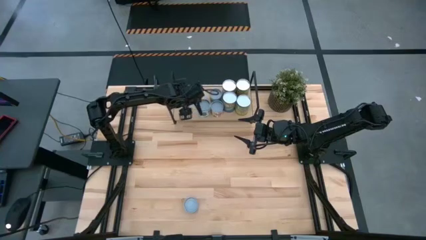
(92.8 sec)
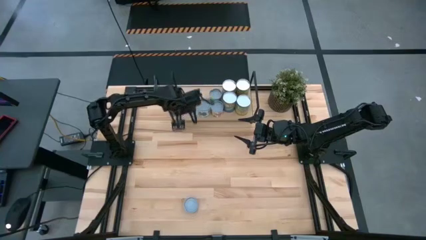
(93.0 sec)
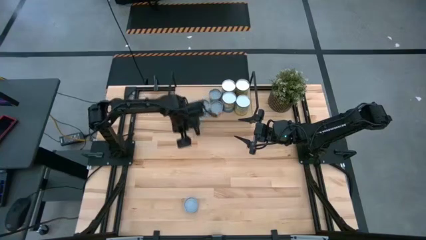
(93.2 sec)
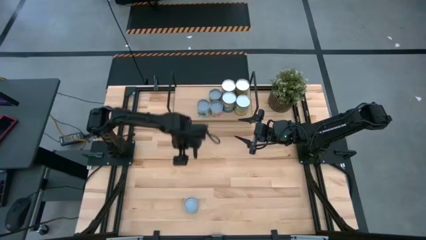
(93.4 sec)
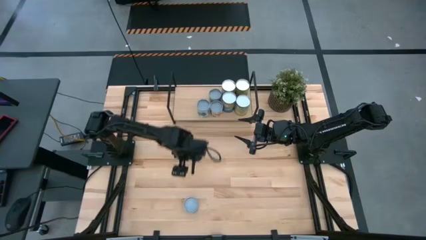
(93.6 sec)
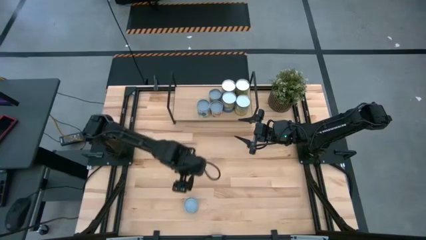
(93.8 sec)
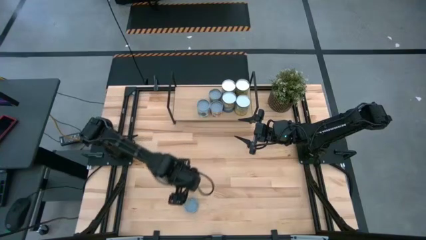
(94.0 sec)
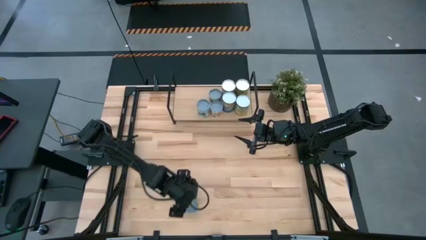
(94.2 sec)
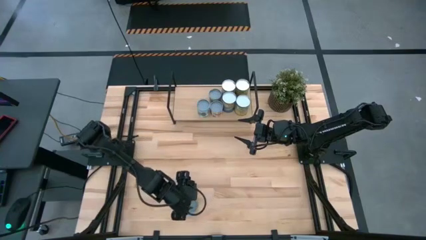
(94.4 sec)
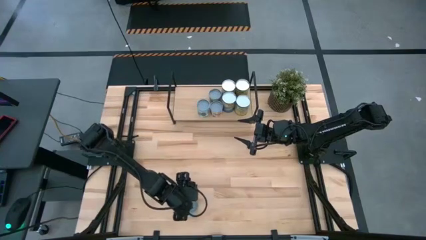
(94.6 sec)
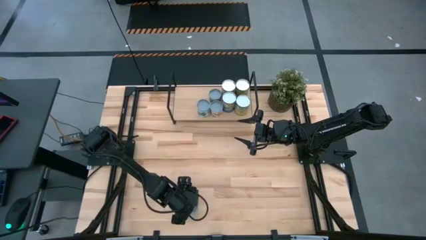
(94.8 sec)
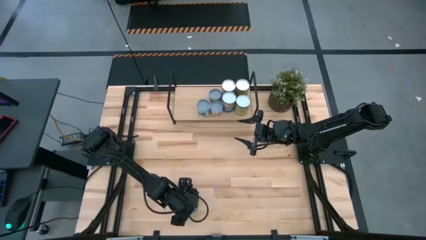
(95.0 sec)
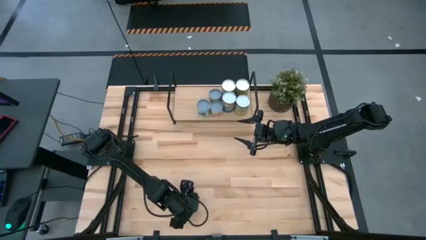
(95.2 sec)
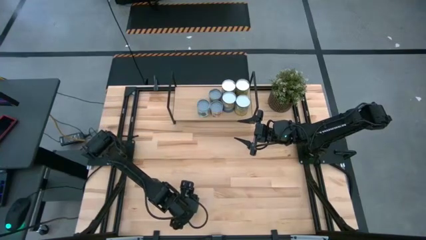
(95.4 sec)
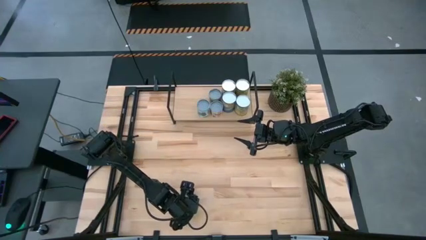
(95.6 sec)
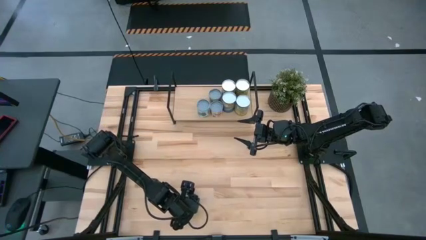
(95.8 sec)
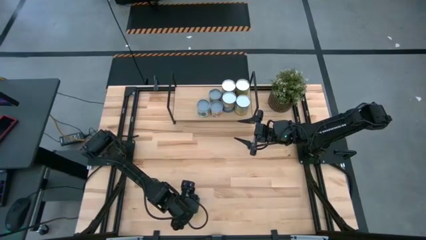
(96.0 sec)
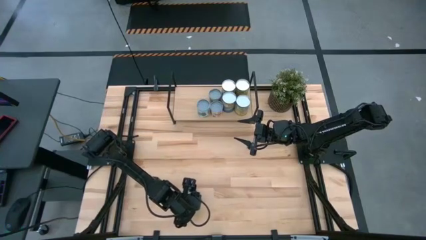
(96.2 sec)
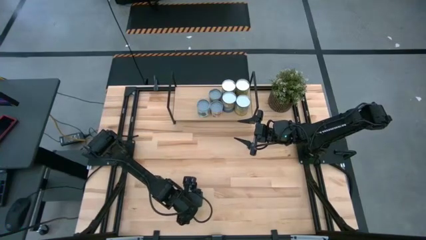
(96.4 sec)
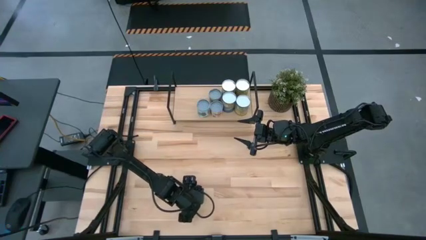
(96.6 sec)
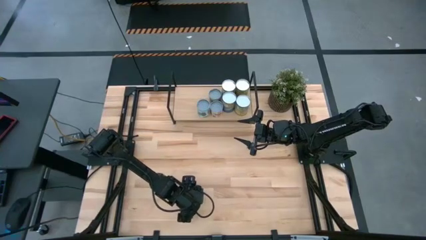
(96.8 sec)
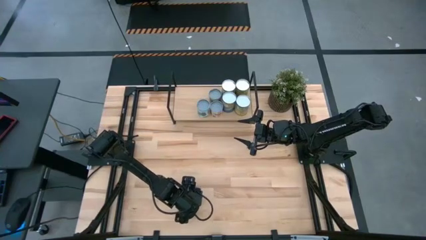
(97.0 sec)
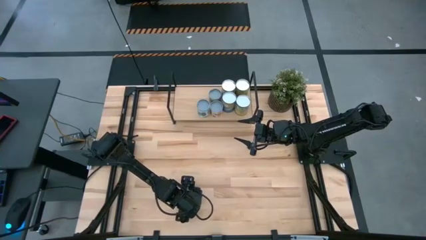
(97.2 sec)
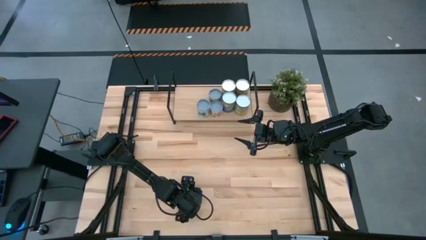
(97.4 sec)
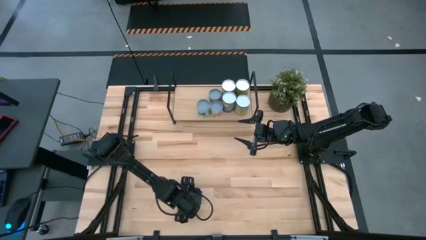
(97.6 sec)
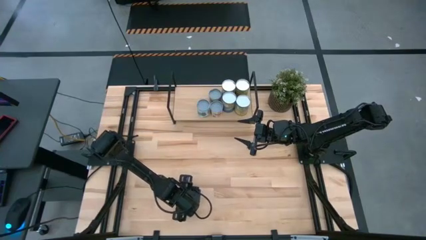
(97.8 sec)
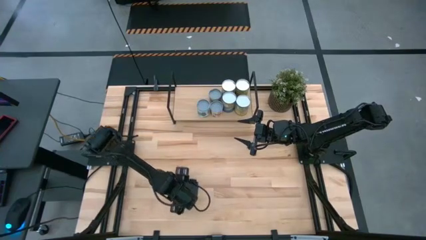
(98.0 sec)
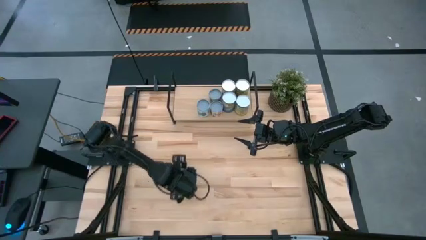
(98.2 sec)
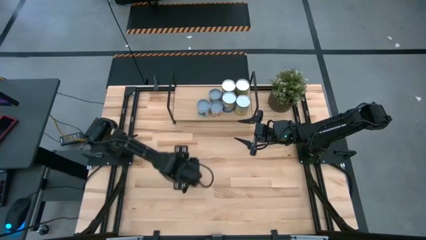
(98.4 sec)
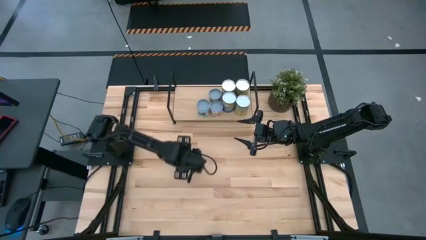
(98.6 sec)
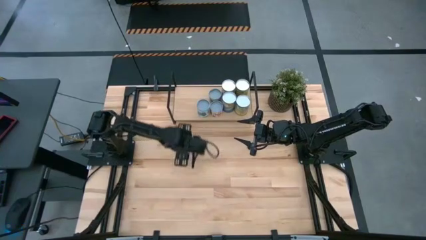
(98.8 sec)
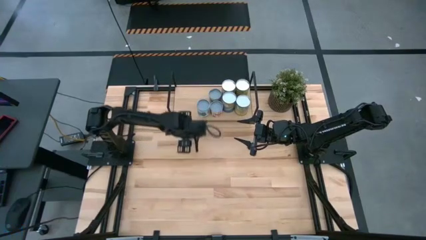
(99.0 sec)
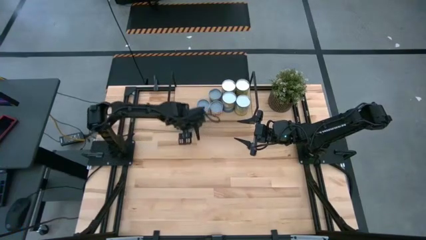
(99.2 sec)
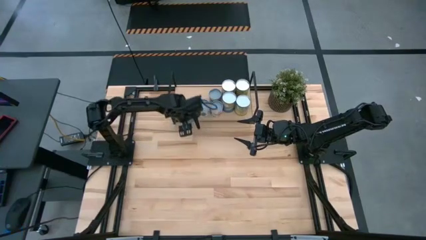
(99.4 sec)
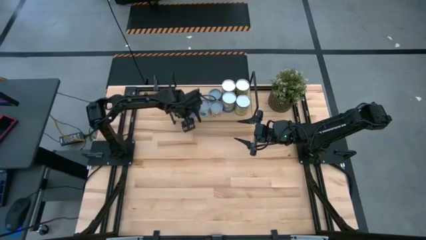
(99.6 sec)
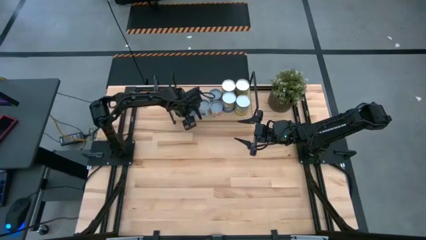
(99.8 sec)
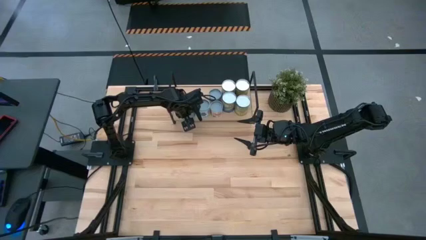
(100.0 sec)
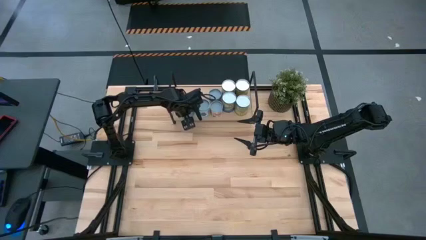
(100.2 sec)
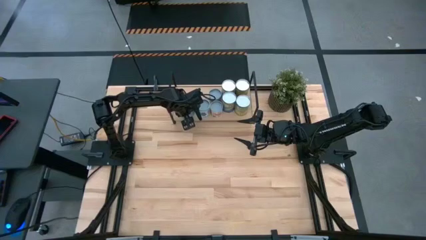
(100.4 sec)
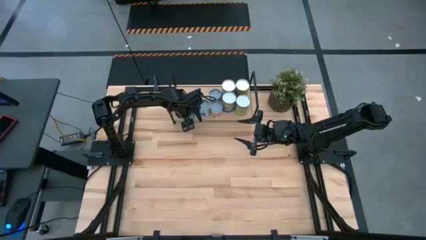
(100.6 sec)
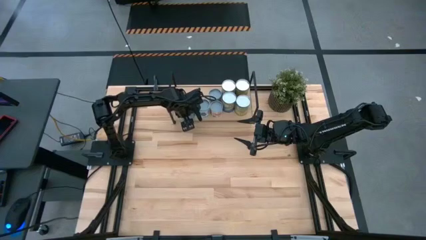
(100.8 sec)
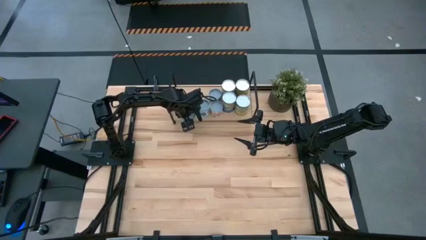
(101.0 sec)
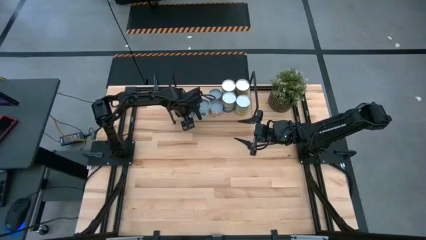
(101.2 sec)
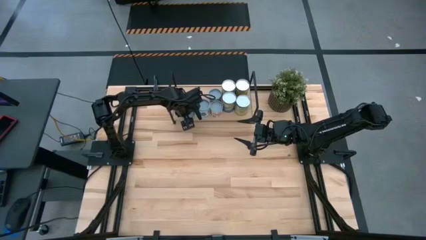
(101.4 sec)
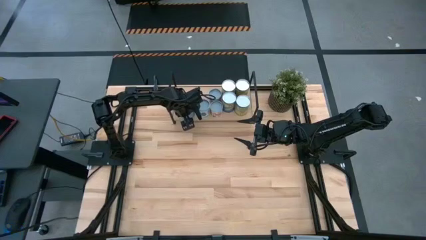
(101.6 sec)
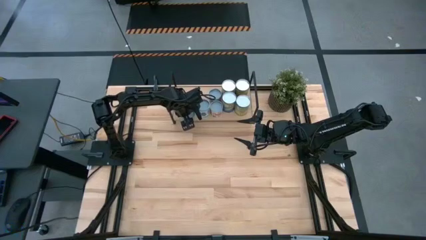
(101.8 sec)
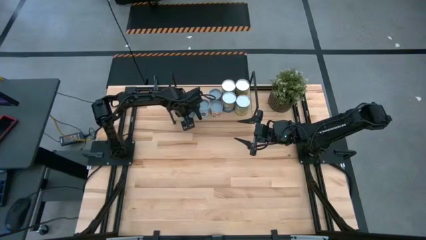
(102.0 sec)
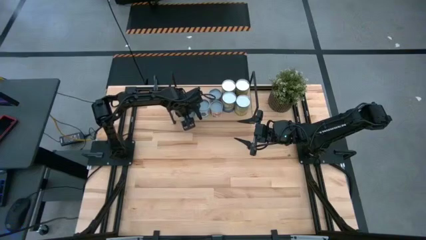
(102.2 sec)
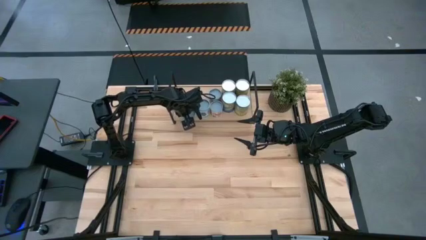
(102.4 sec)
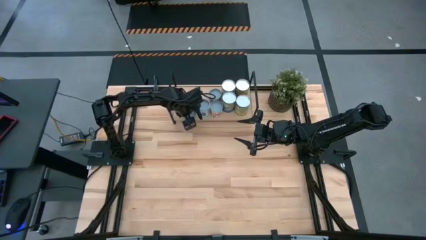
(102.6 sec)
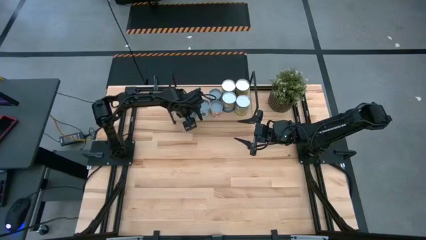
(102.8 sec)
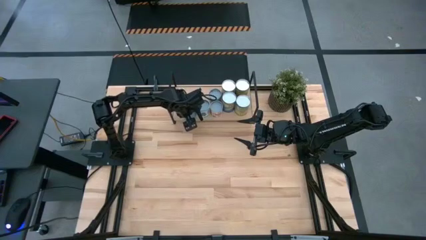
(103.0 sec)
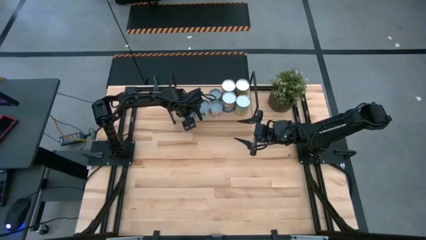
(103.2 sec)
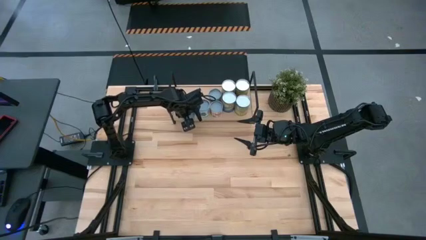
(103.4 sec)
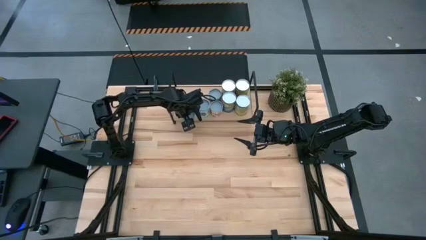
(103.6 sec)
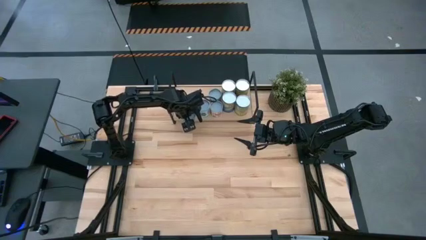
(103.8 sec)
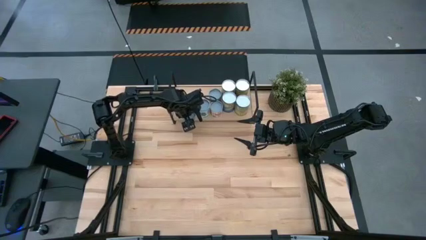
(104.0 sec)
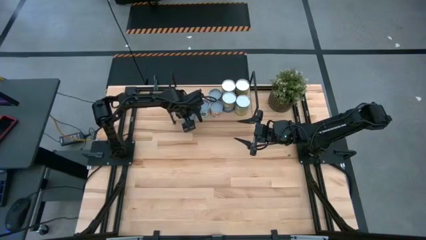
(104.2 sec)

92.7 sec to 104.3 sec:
Task: Pick and place cans onto a shelf
Put the green tuna can on the shelf
